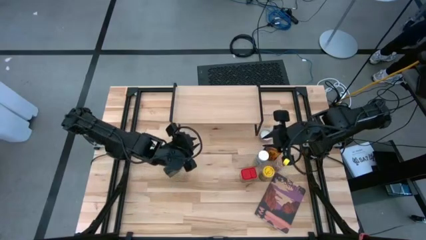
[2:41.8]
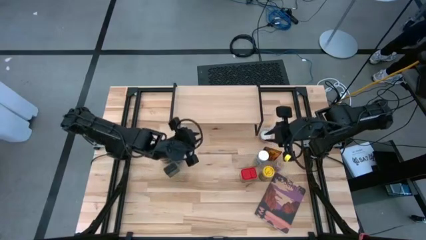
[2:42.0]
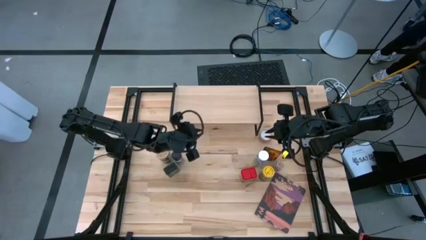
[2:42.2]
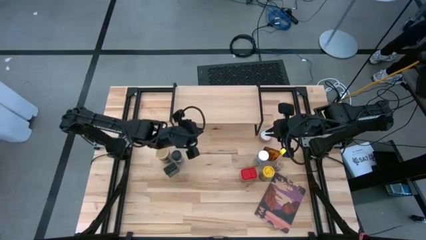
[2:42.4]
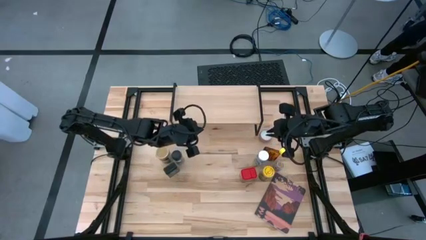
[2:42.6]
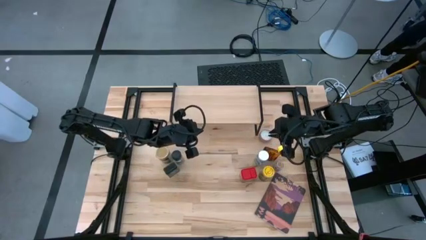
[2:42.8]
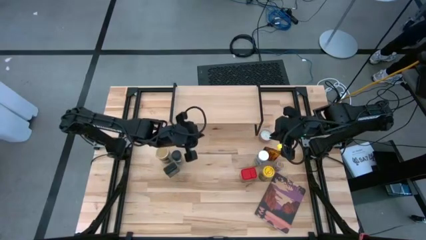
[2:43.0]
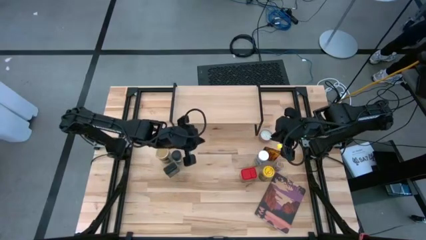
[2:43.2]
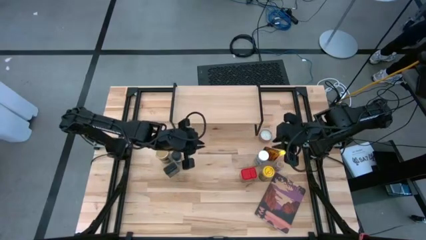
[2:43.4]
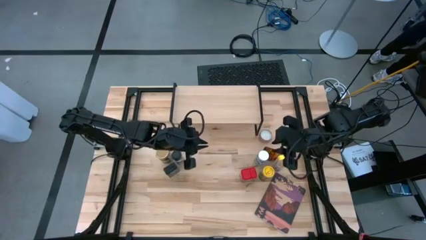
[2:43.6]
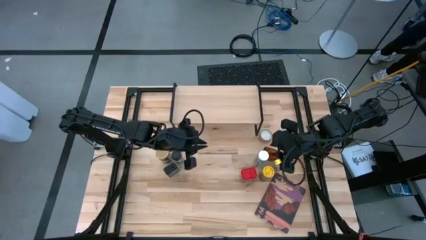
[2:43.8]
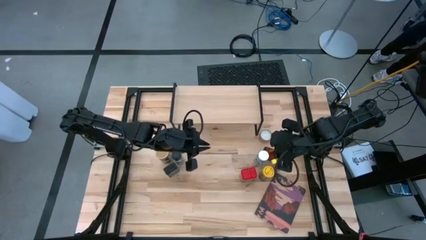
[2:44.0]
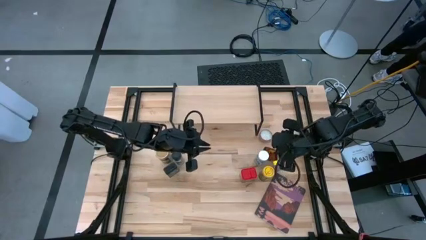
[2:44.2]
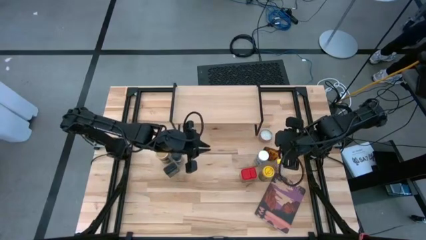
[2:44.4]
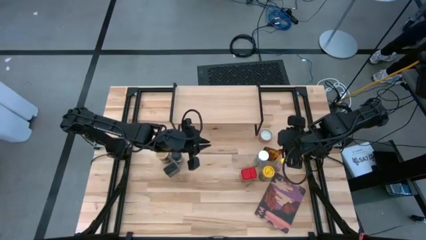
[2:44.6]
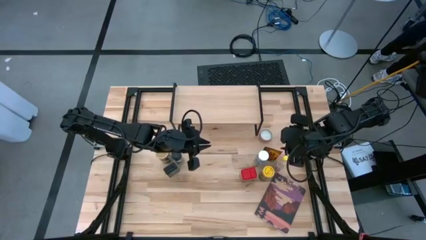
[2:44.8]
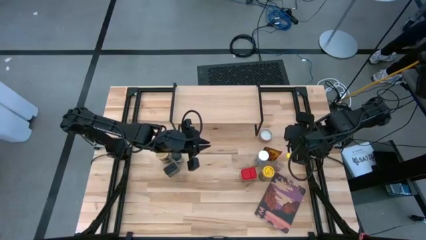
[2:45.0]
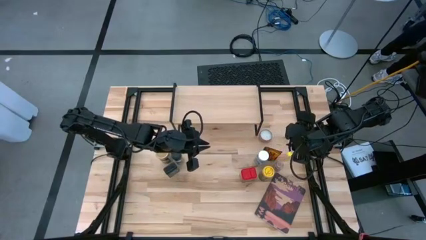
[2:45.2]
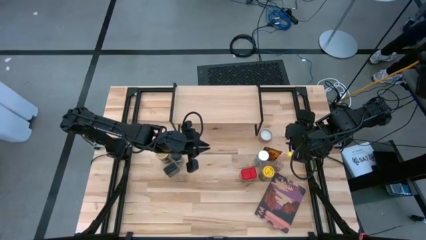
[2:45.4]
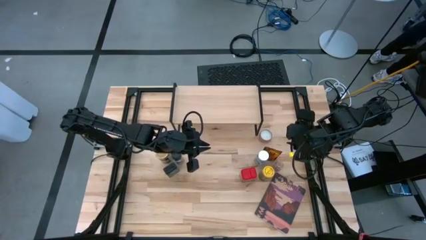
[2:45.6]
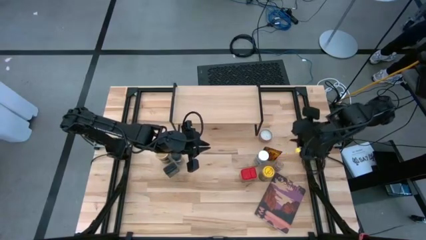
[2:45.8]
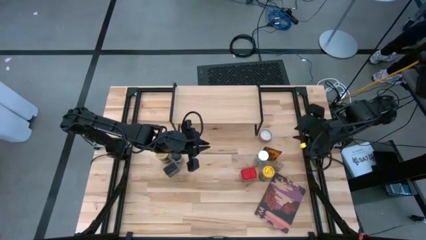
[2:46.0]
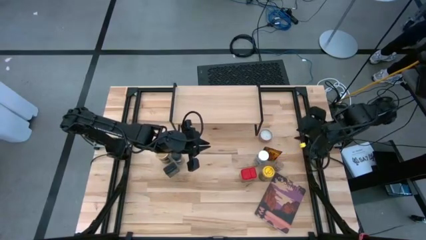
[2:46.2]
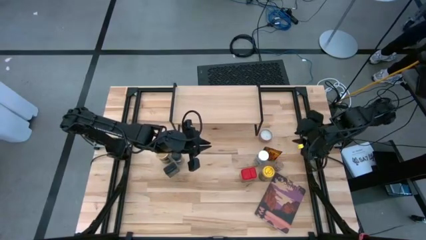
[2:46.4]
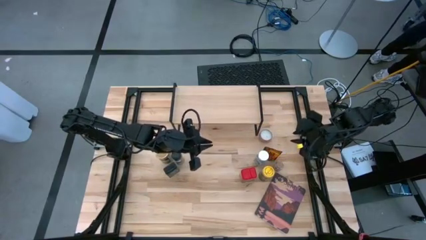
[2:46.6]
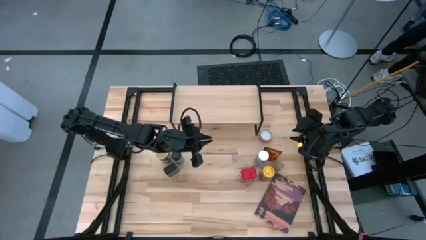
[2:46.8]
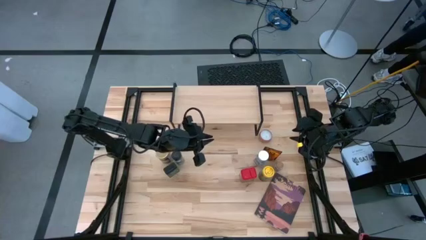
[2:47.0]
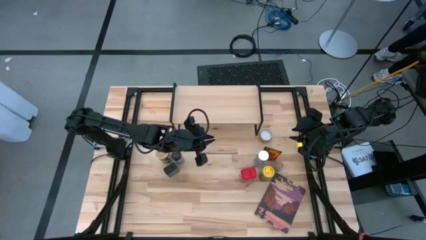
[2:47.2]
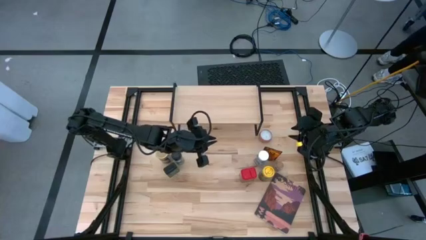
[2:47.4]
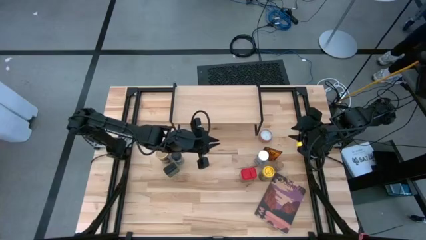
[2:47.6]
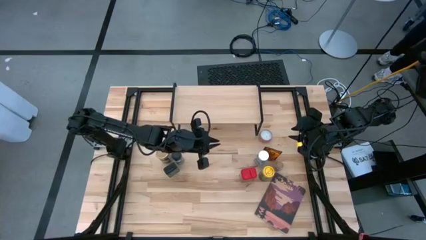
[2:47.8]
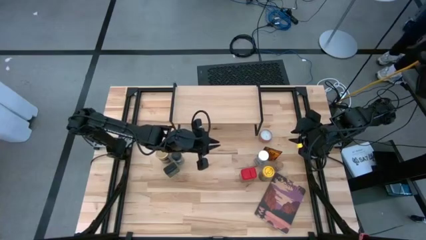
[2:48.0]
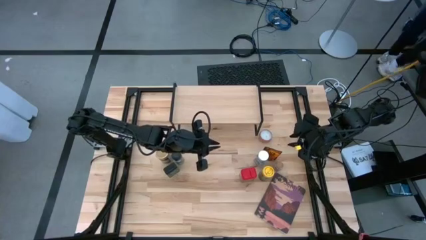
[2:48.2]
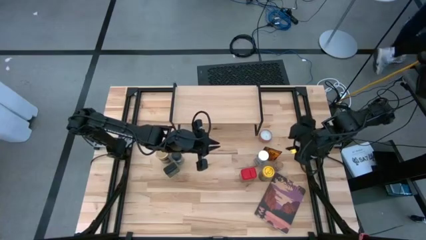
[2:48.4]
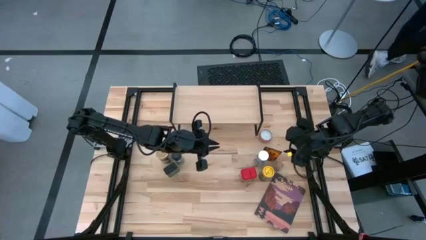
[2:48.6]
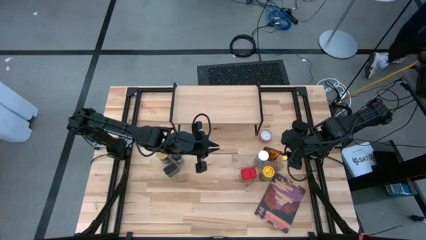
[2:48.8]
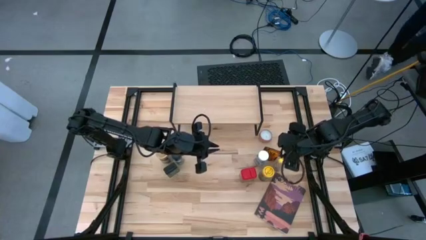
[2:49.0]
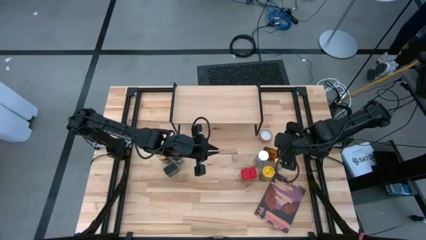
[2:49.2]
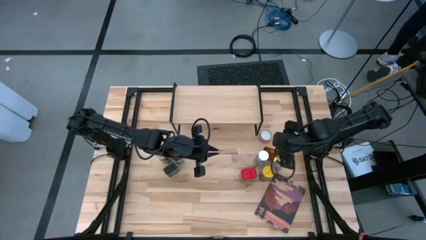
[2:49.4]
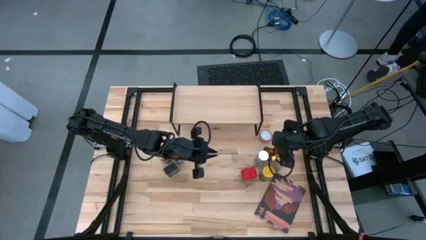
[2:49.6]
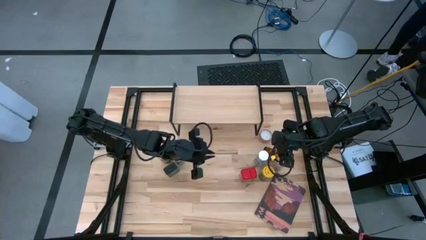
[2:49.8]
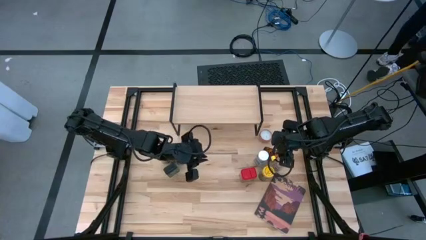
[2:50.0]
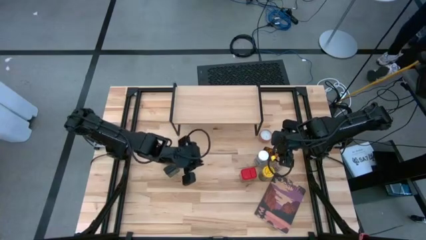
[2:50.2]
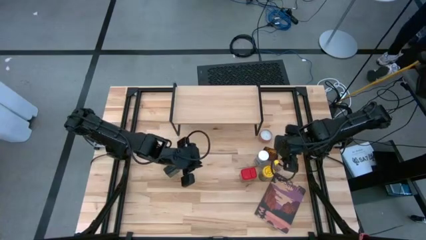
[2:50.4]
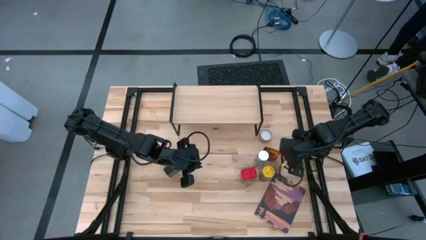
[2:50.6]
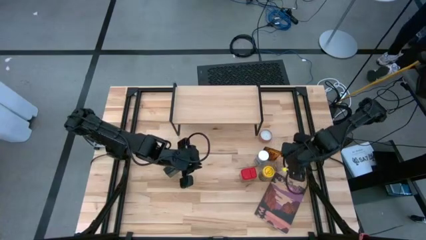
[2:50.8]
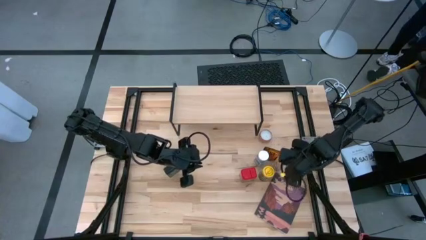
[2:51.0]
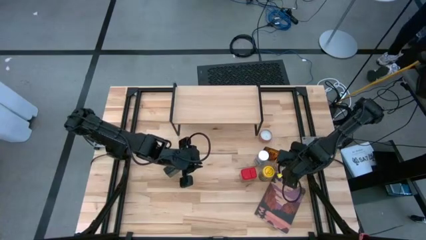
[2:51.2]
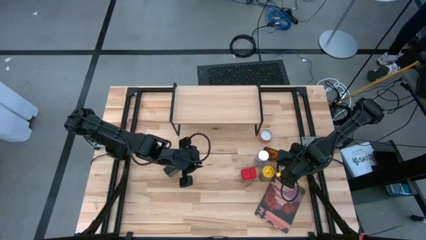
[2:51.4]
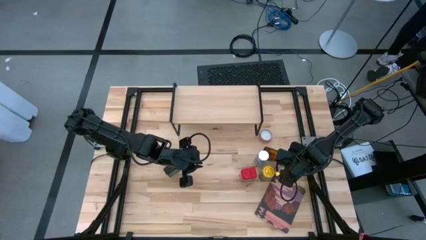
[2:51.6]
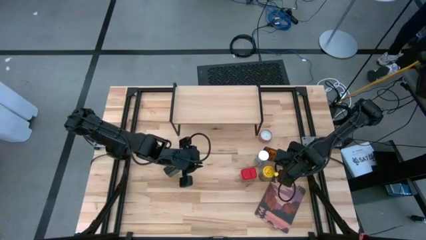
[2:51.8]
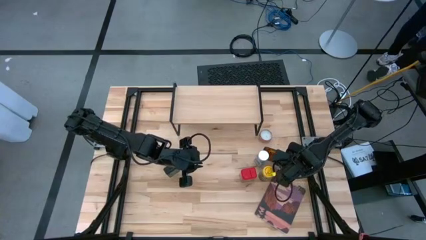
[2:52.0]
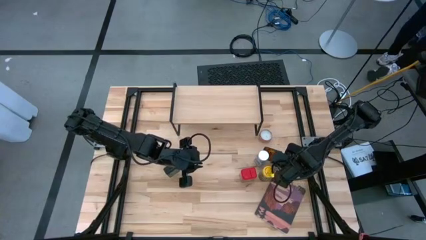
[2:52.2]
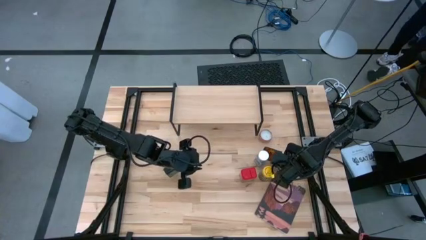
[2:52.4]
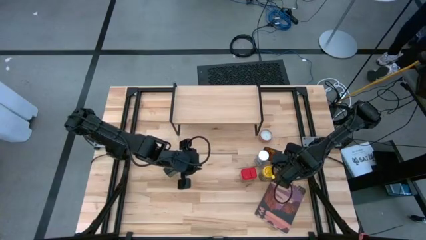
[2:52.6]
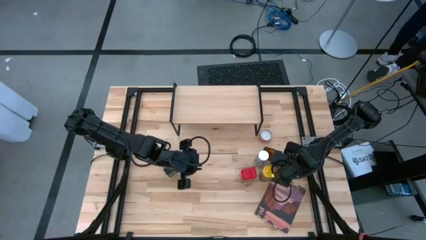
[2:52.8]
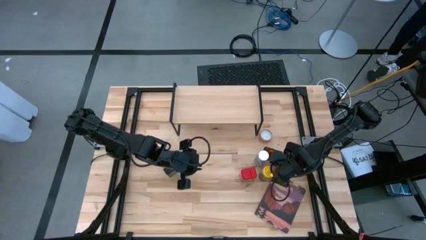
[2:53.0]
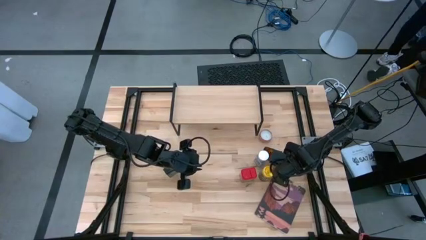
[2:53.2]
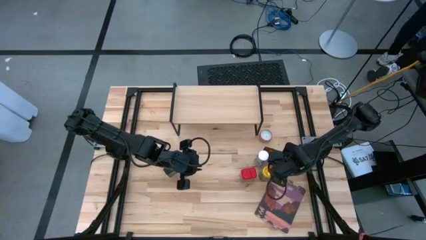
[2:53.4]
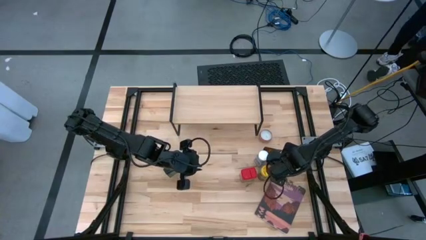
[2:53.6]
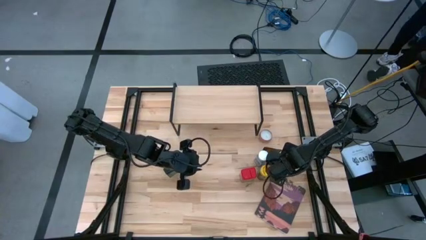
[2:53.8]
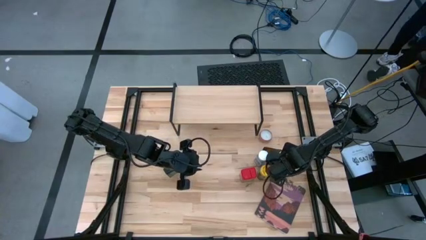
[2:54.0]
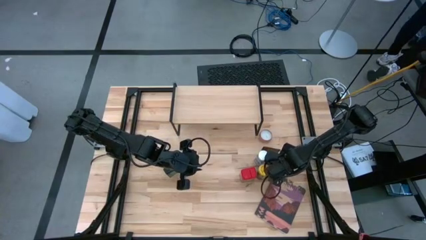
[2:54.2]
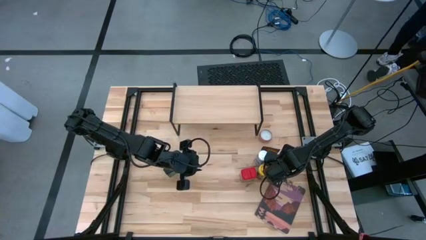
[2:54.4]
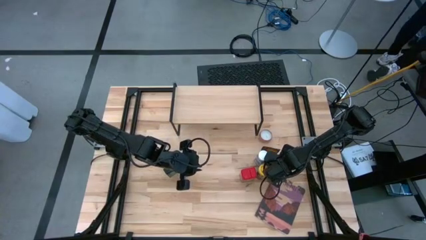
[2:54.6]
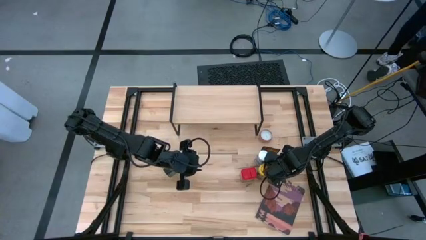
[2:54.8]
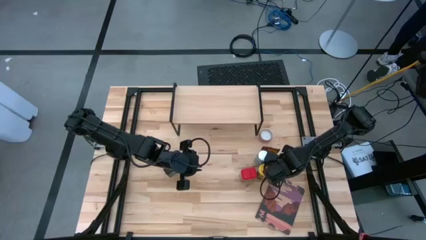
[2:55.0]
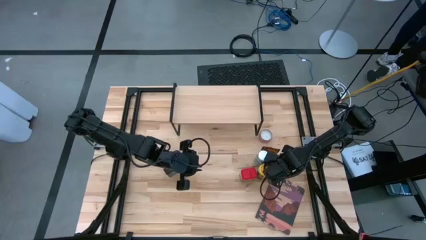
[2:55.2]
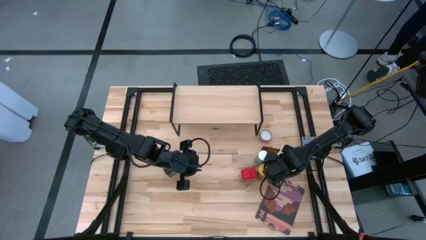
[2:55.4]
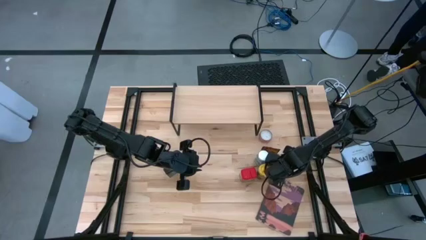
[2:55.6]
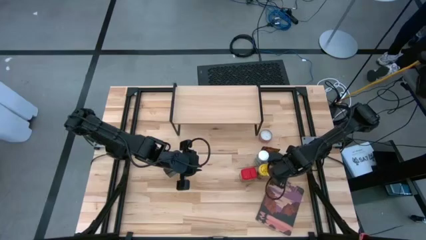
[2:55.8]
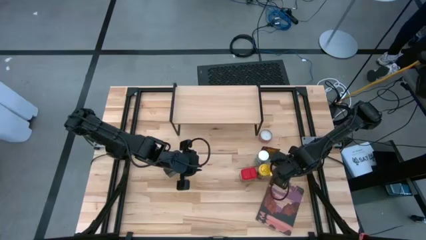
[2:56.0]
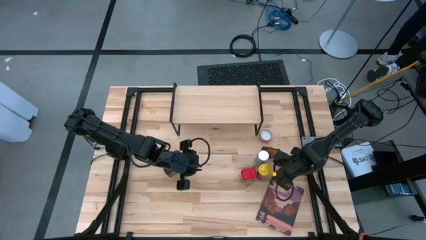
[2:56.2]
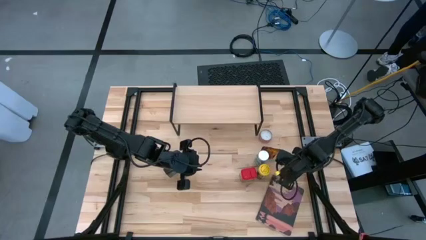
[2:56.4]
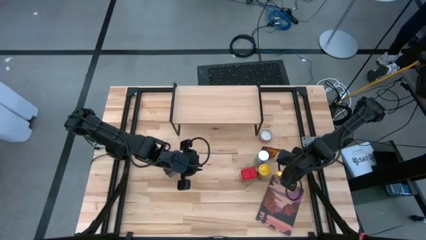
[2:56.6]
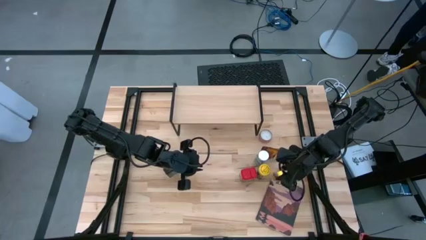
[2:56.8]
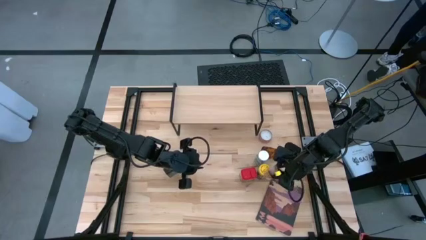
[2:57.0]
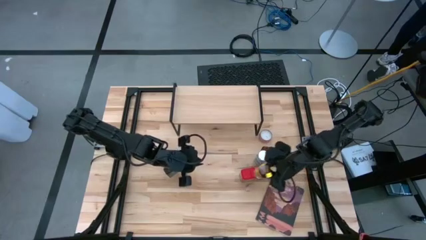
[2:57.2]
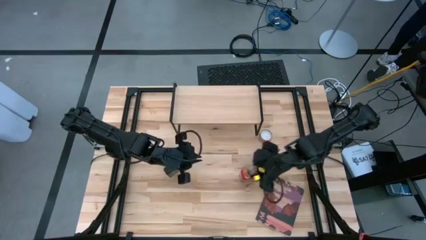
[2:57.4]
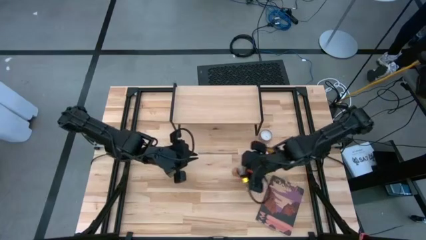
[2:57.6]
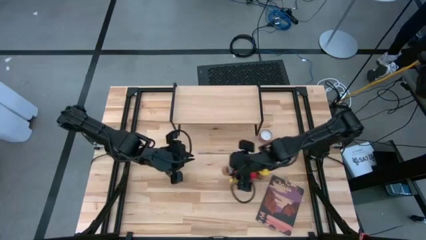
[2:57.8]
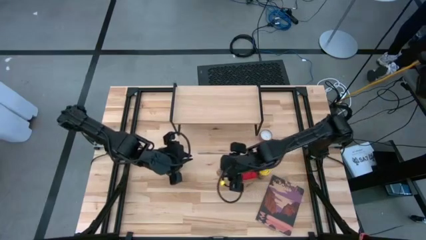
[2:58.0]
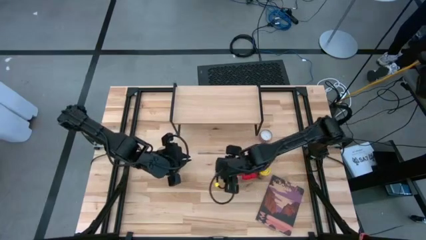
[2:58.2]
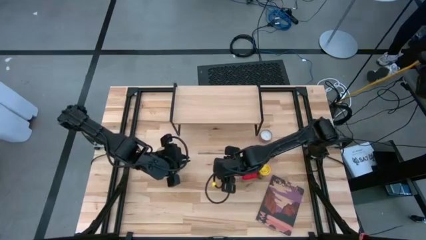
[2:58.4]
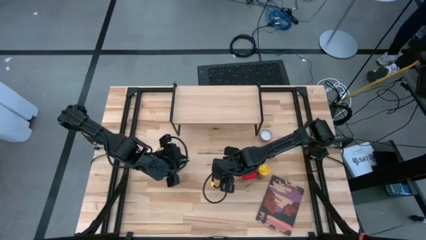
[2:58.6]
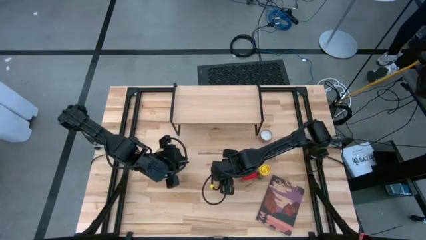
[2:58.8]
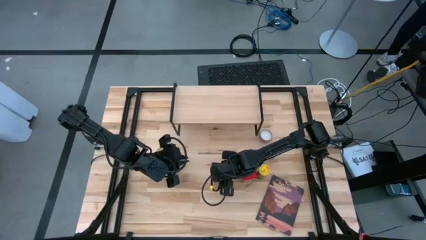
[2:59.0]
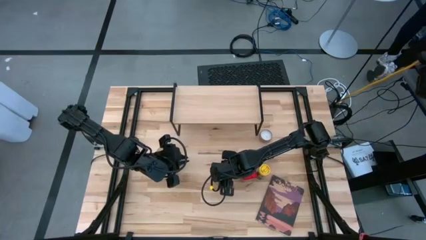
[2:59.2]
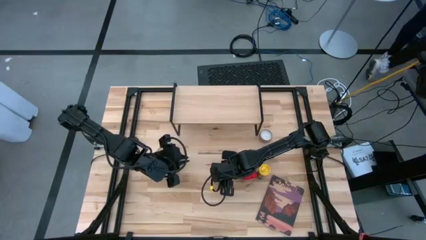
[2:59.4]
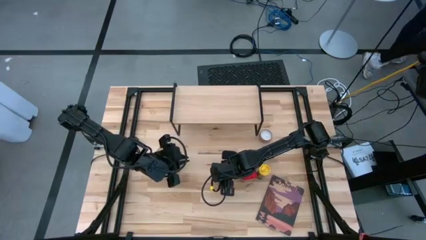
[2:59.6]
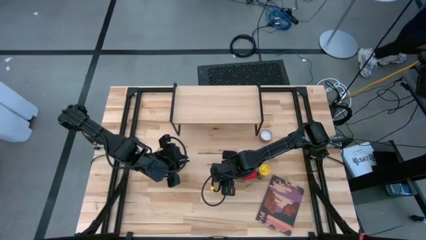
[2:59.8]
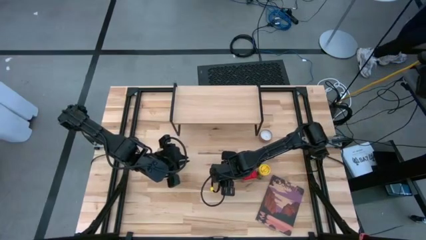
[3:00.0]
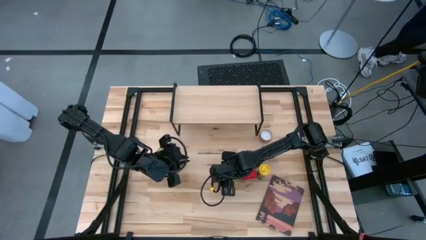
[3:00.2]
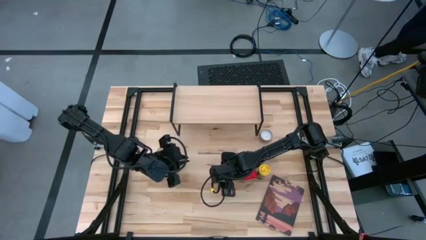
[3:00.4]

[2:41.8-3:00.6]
Task: Shelf spices
Put the transparent spice bottle to the center of the table
